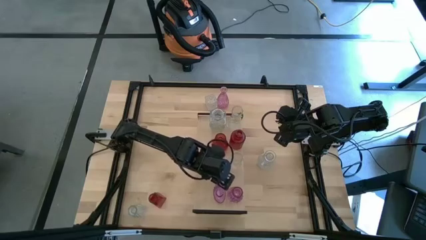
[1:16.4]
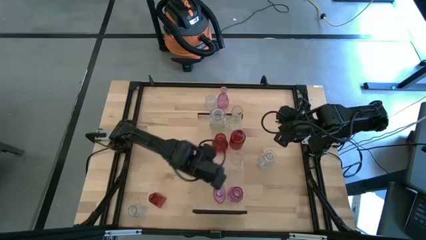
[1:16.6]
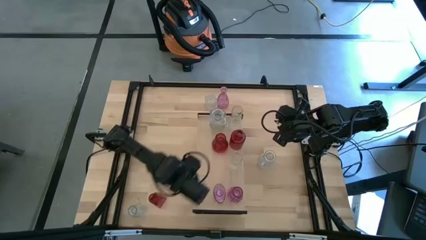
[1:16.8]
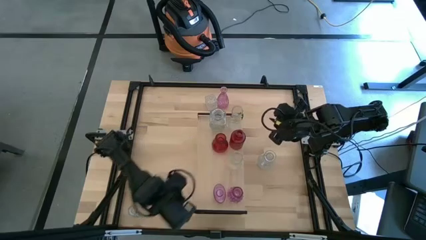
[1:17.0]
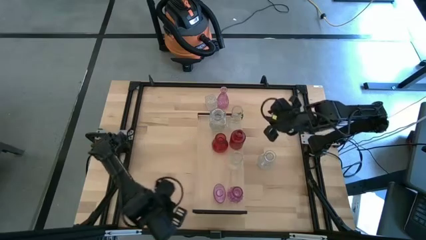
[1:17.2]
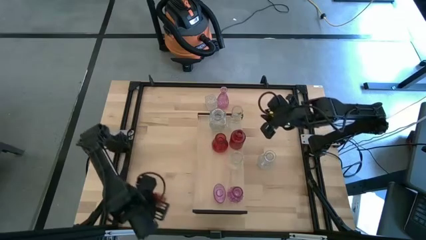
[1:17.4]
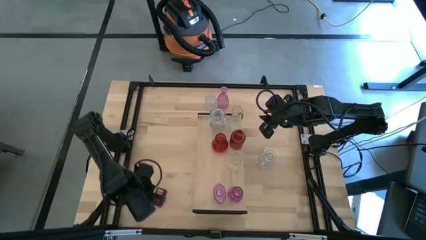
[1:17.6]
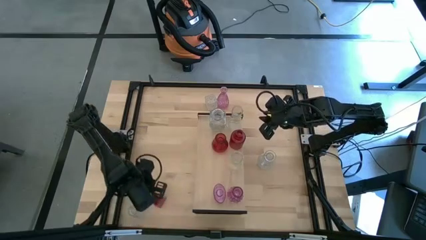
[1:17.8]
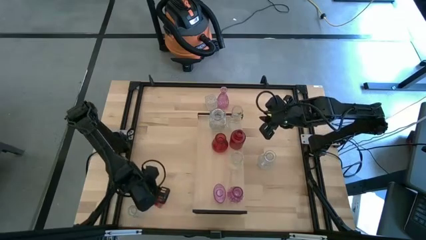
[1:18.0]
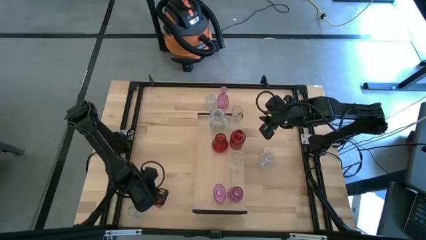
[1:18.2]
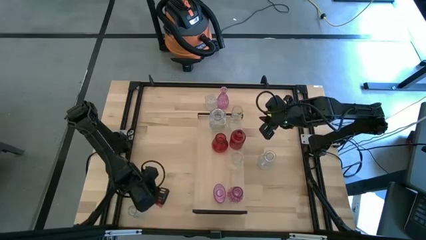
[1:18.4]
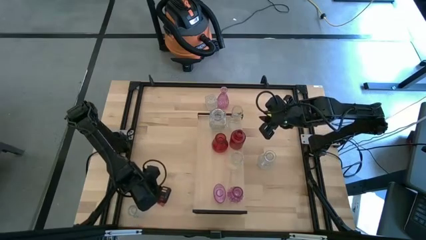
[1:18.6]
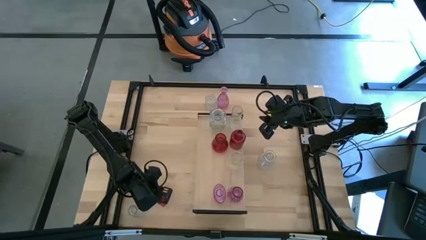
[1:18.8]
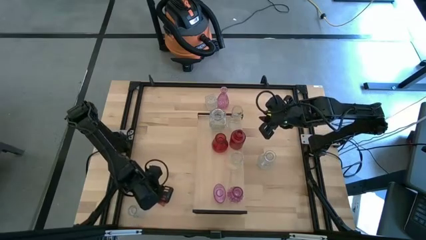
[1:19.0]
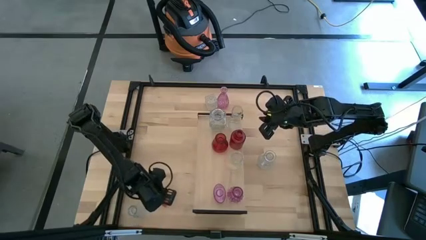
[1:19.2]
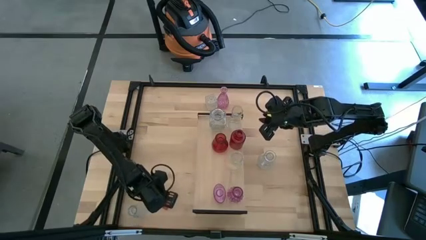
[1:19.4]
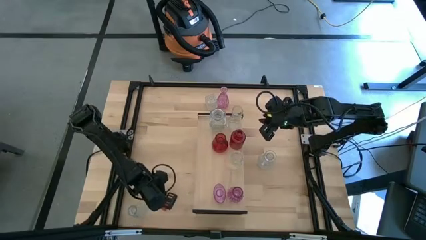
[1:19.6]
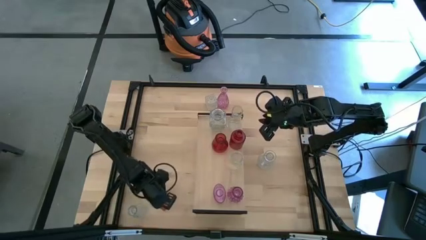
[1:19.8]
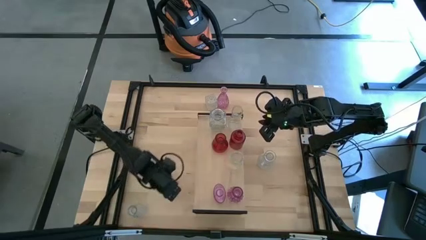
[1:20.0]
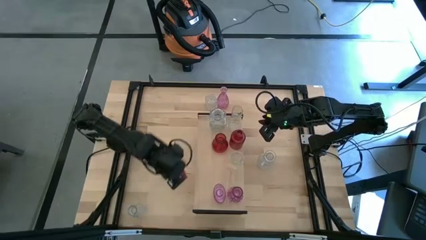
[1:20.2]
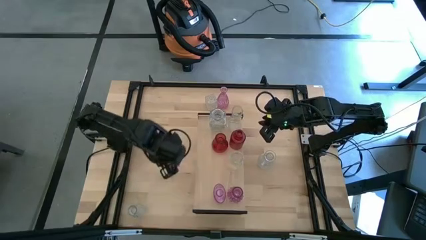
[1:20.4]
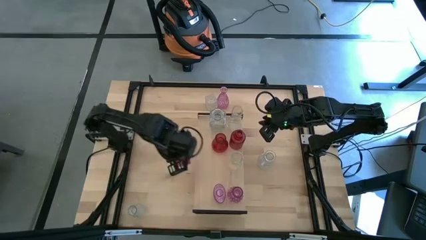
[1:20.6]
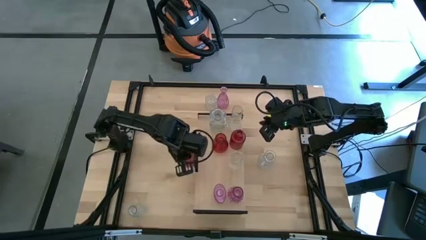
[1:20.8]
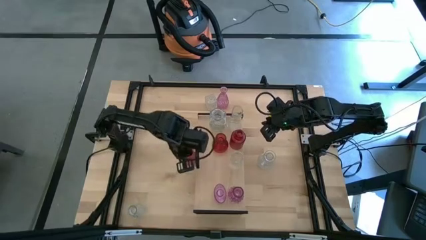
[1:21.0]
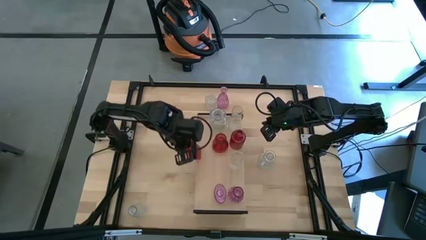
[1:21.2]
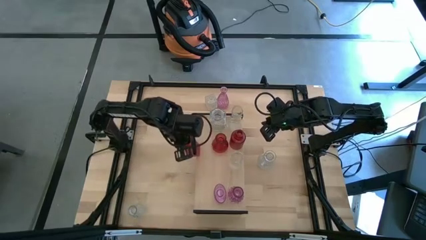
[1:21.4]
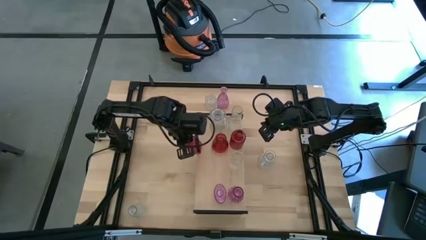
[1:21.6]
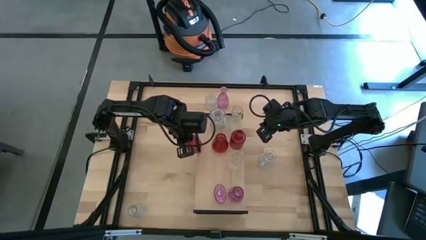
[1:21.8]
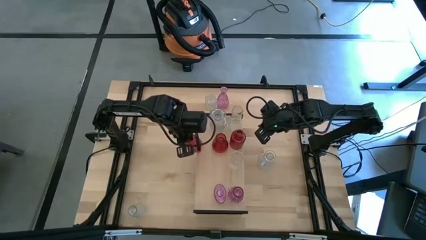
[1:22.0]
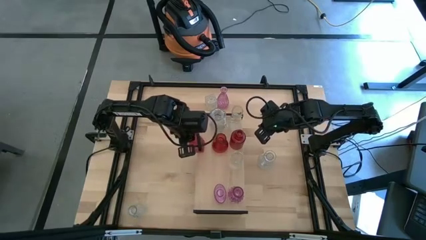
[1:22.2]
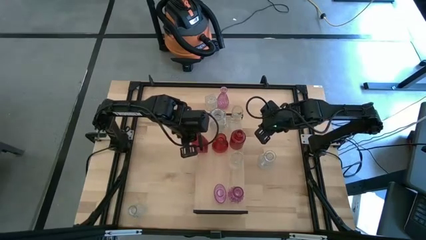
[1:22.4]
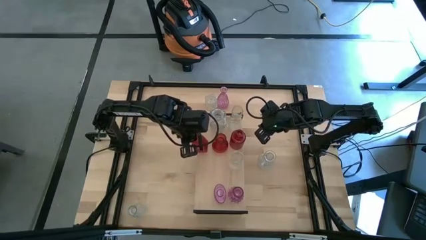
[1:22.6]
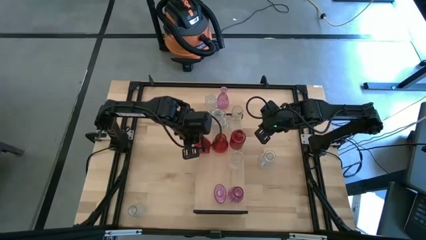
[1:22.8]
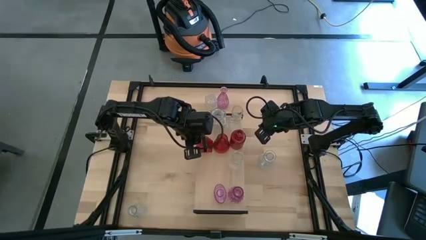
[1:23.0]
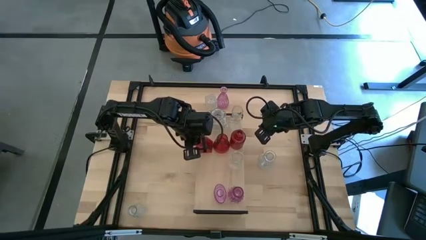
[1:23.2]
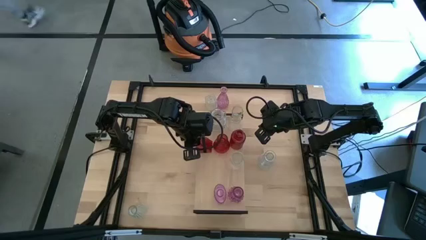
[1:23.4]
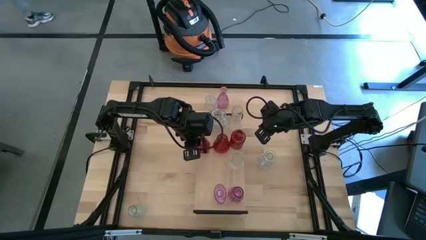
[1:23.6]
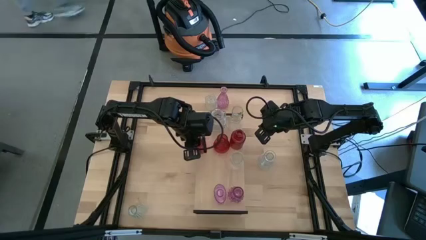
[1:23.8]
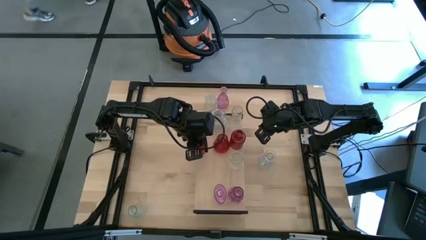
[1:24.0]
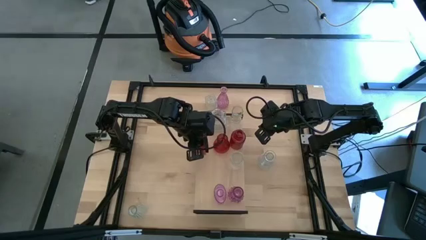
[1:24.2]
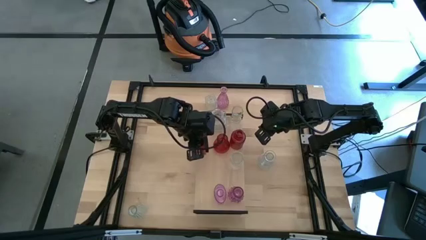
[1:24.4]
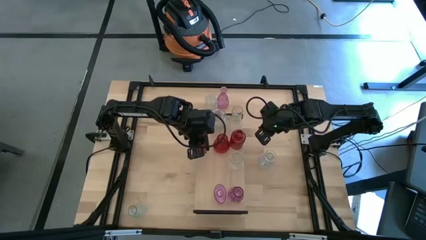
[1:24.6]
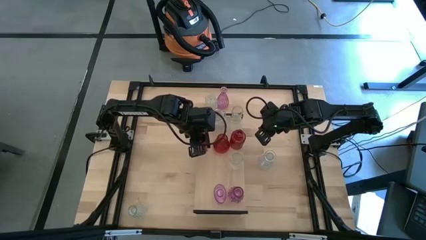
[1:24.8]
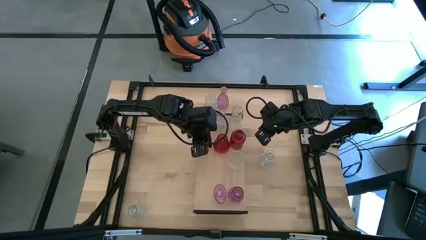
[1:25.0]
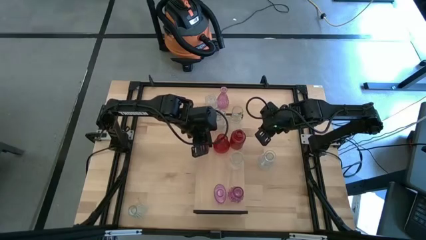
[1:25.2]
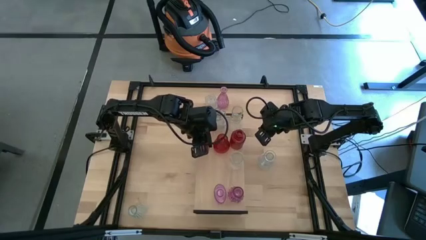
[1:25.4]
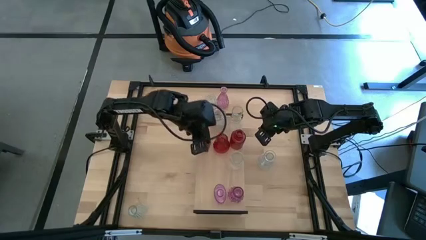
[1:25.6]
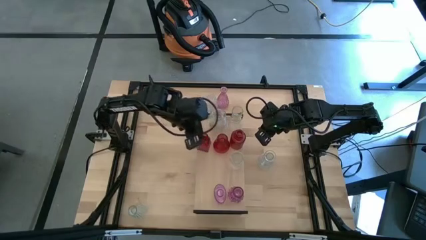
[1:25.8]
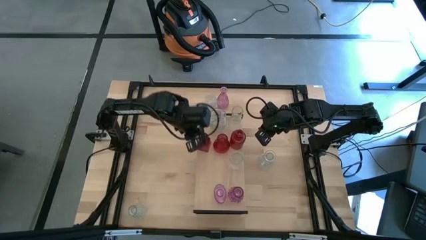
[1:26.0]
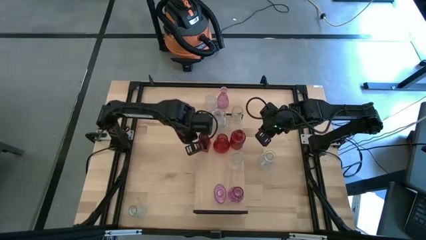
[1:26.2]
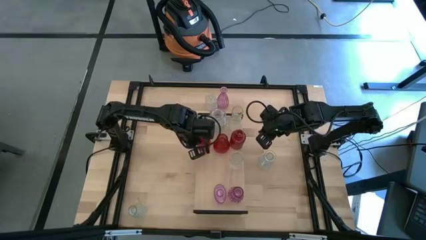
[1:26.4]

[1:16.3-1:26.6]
Task: sort vases onto shelf
Put the red vase on the shelf aligned with the red vases

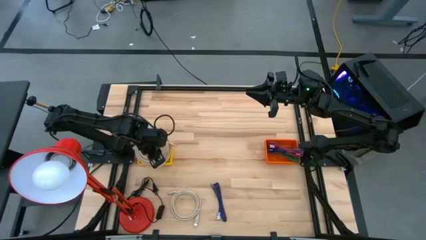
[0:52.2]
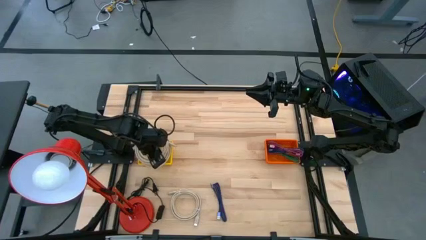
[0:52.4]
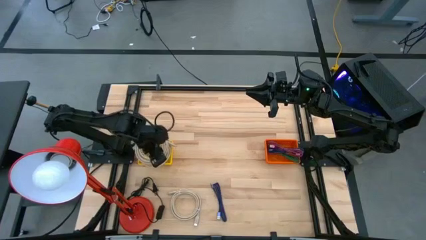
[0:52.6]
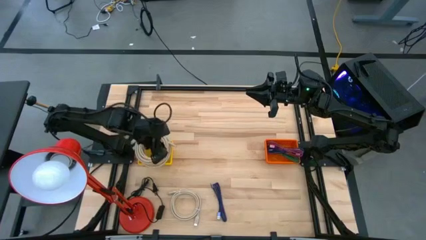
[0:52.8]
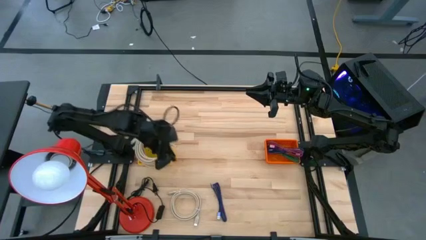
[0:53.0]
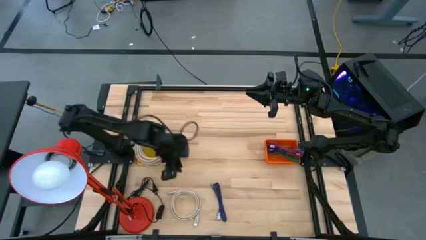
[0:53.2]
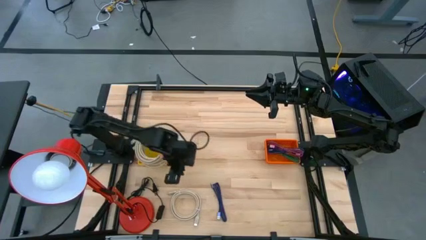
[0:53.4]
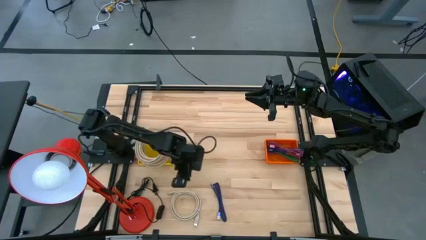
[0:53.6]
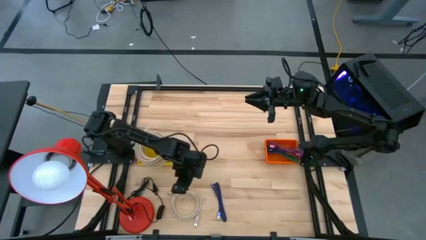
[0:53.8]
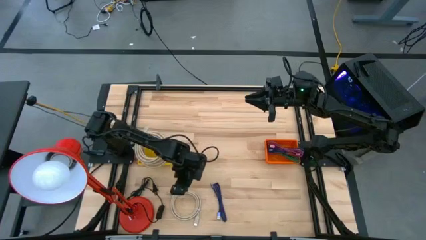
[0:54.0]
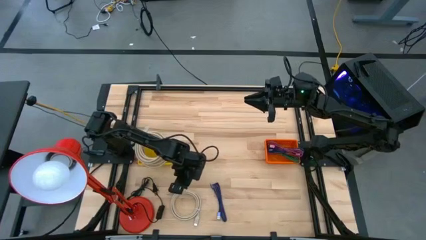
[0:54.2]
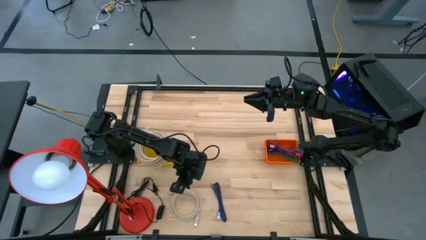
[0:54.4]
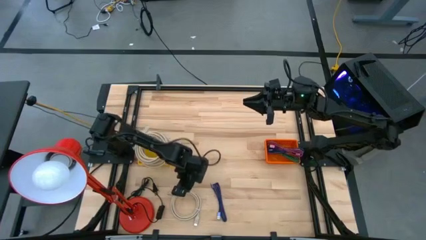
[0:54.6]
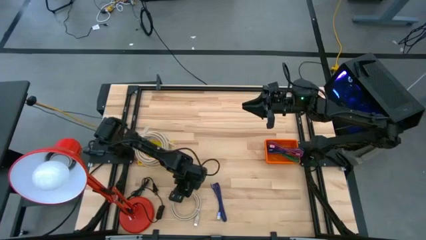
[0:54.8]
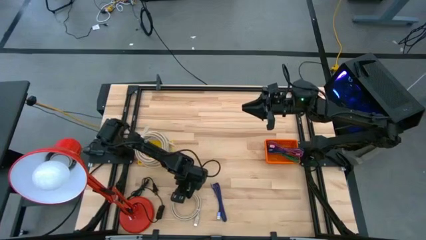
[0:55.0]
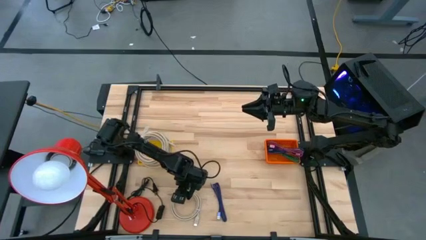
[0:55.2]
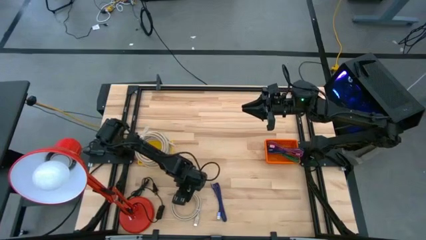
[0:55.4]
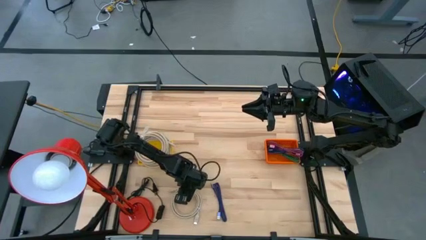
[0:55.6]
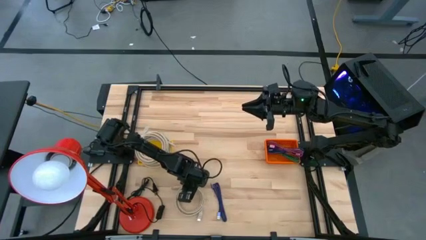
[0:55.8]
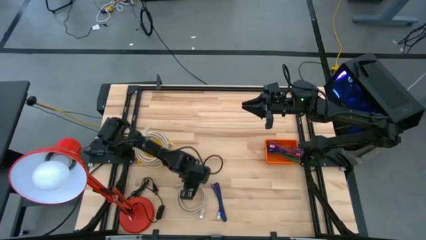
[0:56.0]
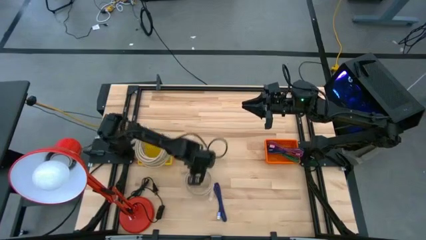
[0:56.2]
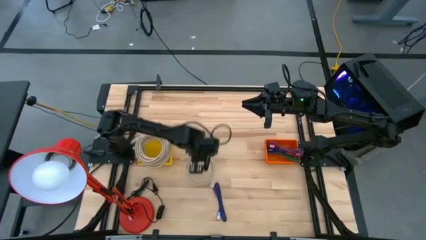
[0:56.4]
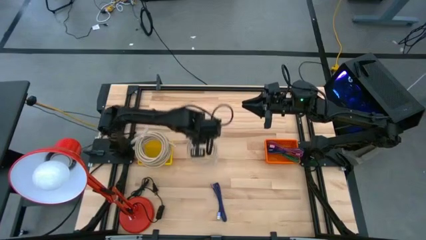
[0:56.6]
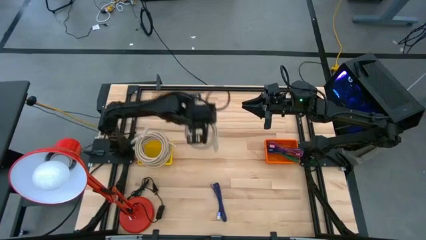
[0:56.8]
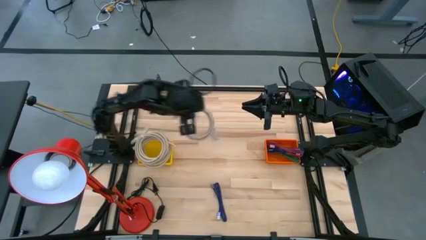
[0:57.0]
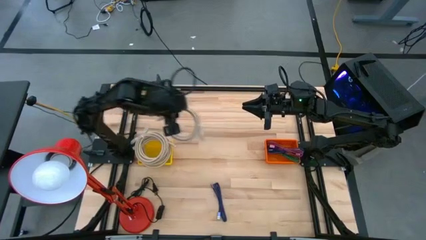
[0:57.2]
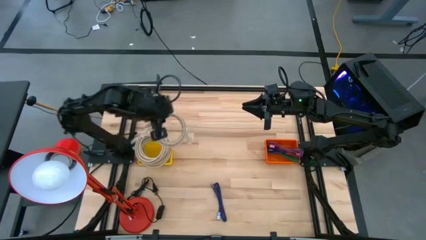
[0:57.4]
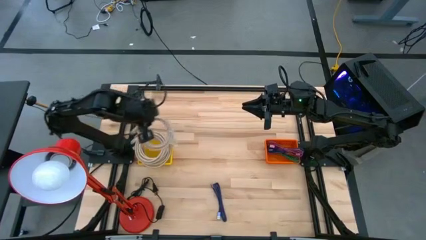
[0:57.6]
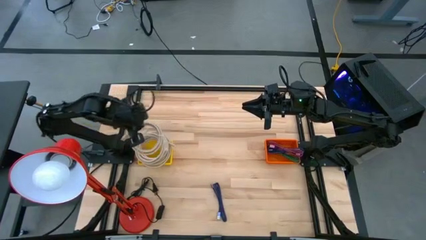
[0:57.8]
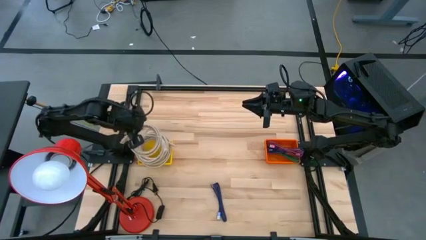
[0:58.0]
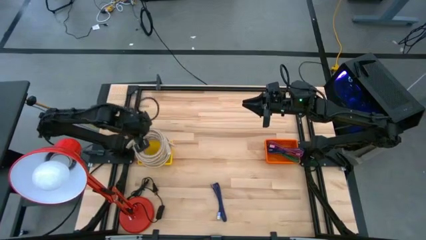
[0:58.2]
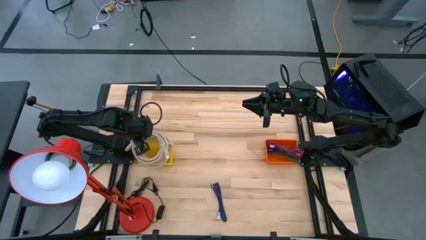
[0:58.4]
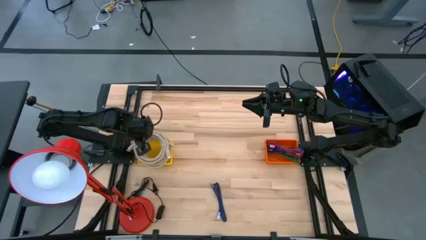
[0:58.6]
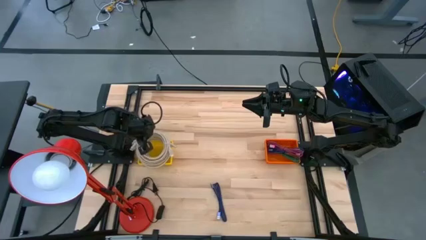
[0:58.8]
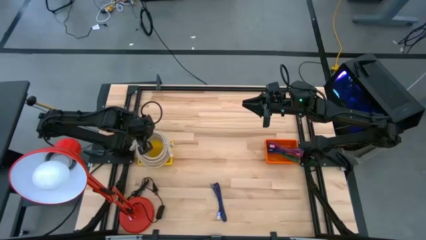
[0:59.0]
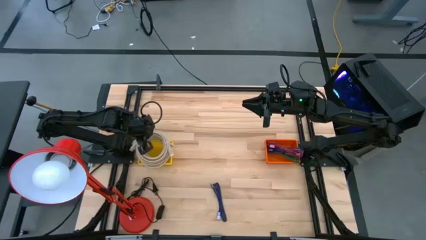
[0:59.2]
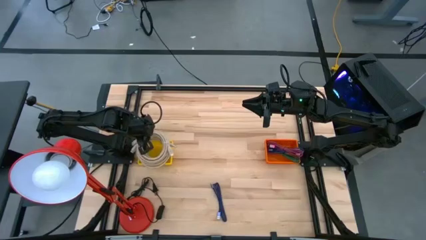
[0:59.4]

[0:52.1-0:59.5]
Task: Pick & Place USB Port
Put the light brown HDMI cable into the yellow bin
